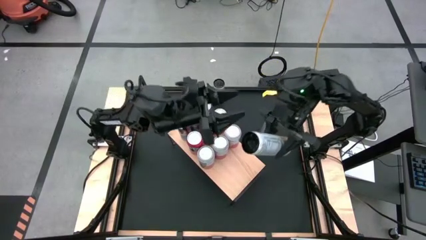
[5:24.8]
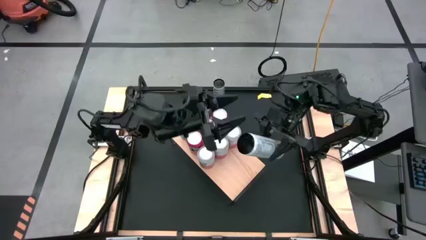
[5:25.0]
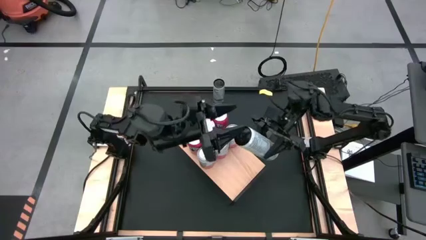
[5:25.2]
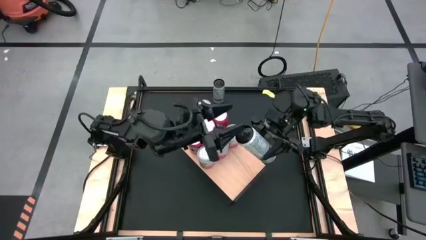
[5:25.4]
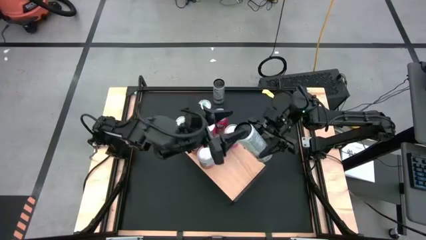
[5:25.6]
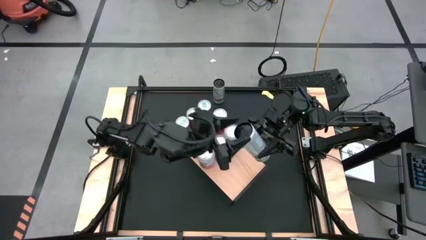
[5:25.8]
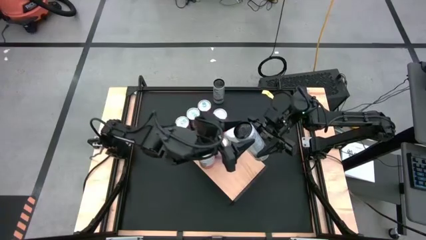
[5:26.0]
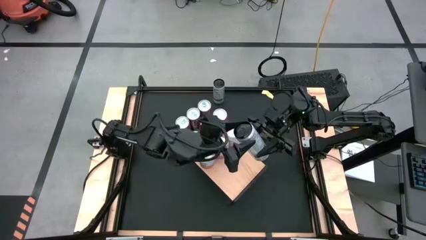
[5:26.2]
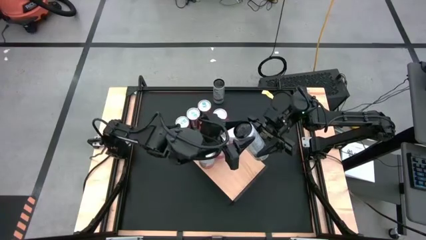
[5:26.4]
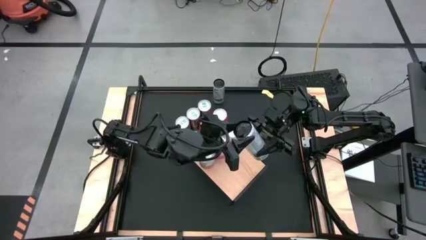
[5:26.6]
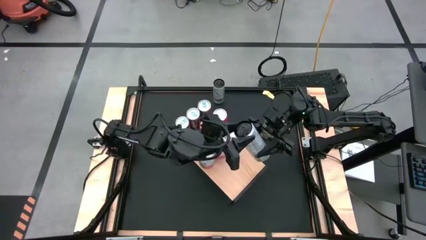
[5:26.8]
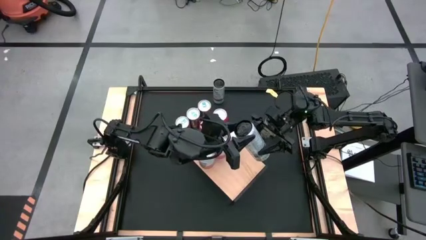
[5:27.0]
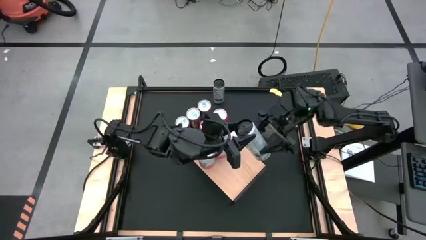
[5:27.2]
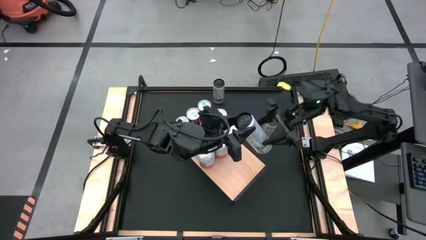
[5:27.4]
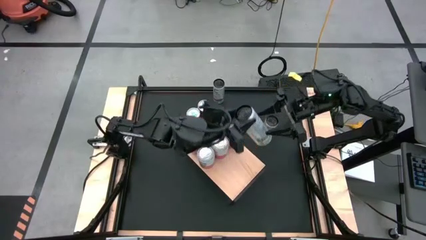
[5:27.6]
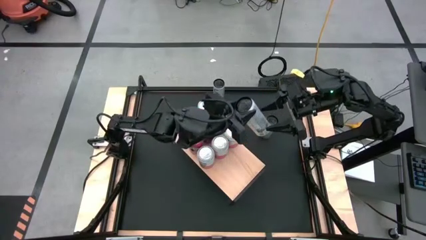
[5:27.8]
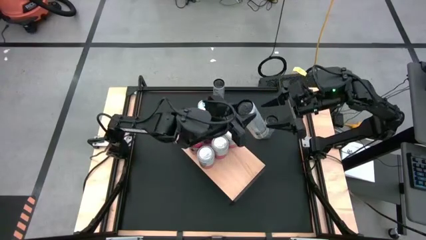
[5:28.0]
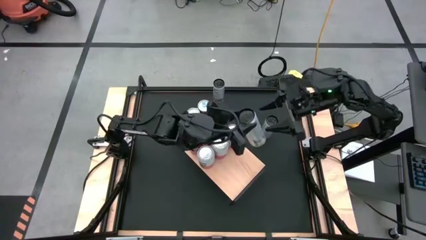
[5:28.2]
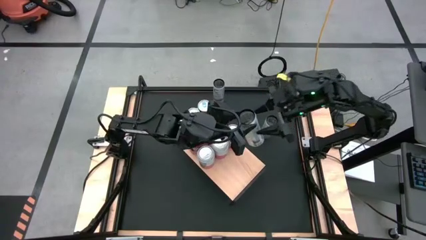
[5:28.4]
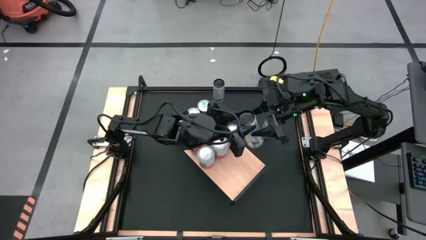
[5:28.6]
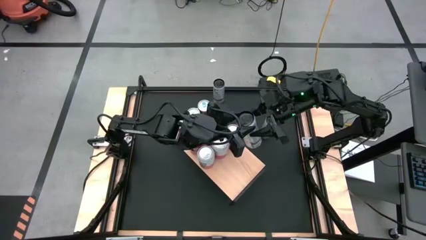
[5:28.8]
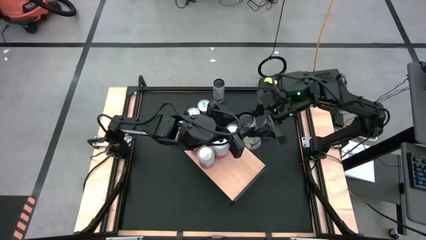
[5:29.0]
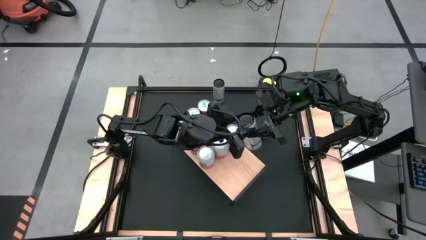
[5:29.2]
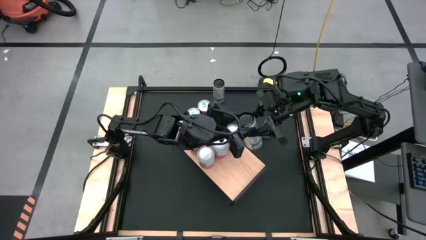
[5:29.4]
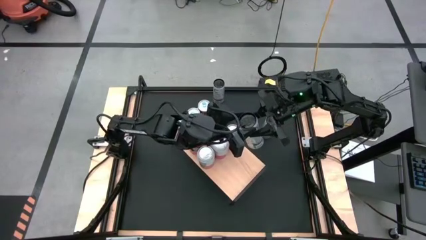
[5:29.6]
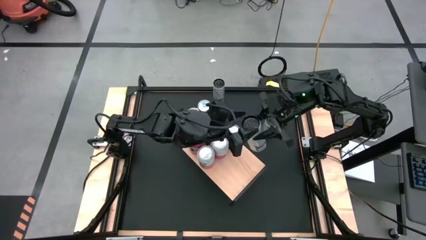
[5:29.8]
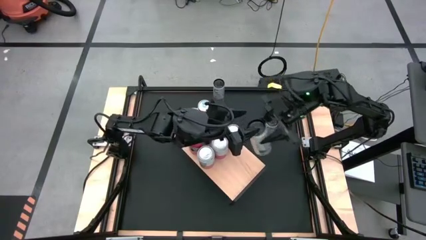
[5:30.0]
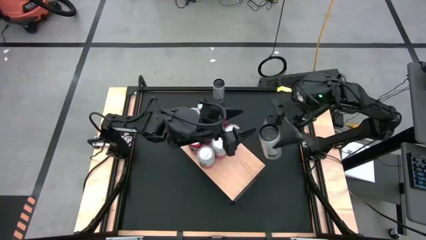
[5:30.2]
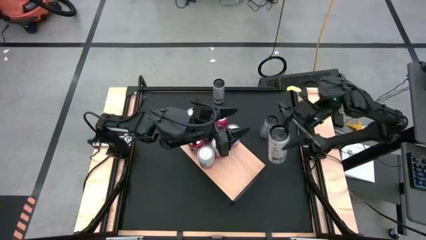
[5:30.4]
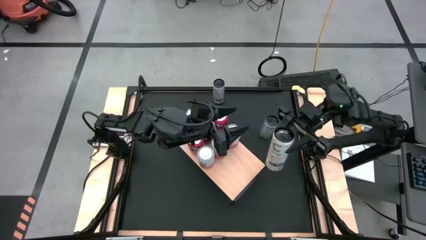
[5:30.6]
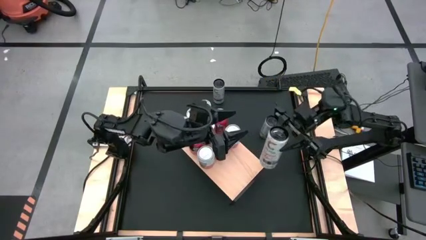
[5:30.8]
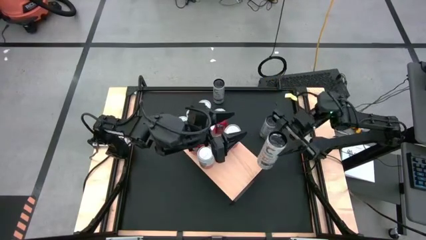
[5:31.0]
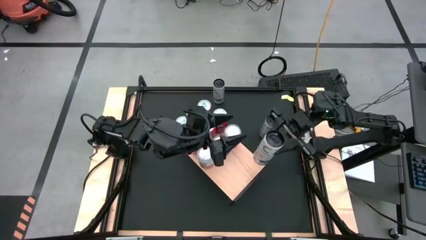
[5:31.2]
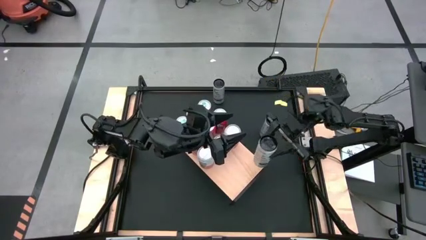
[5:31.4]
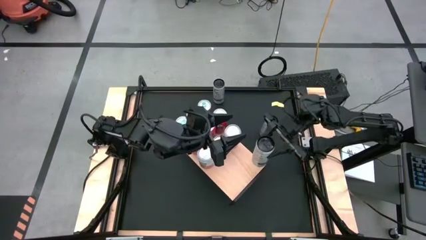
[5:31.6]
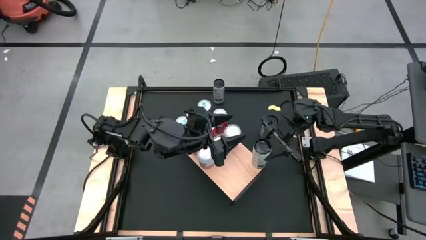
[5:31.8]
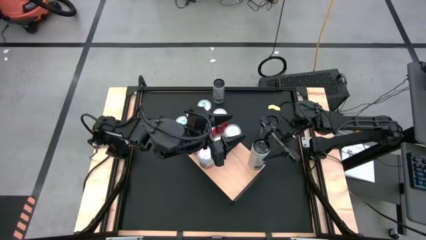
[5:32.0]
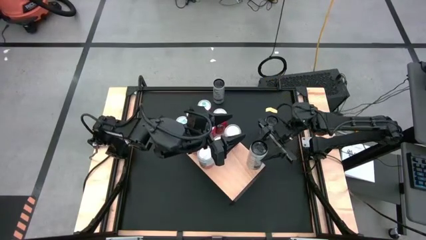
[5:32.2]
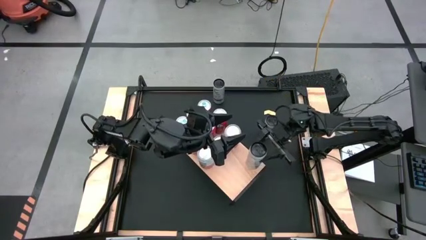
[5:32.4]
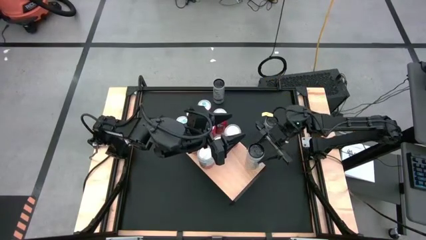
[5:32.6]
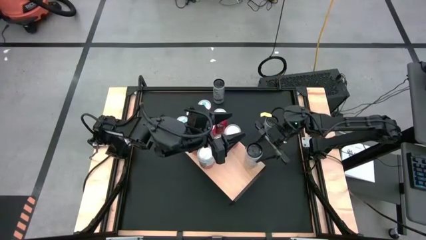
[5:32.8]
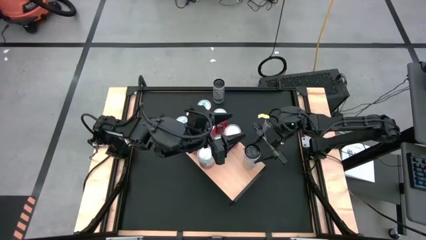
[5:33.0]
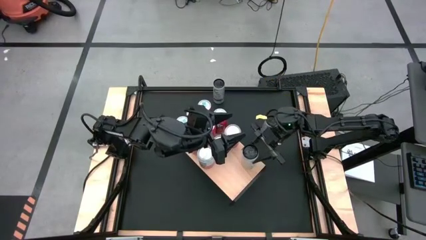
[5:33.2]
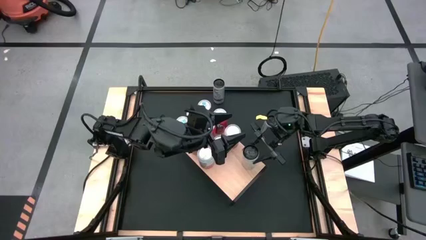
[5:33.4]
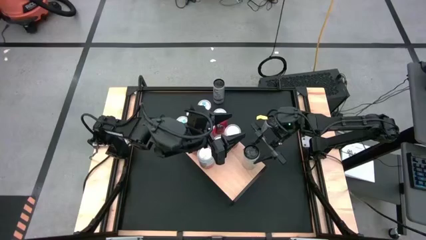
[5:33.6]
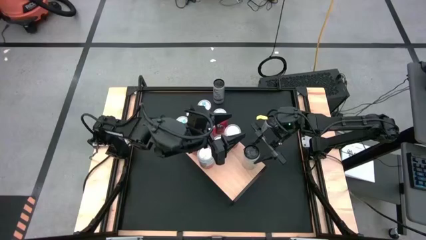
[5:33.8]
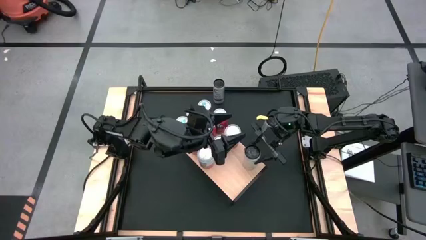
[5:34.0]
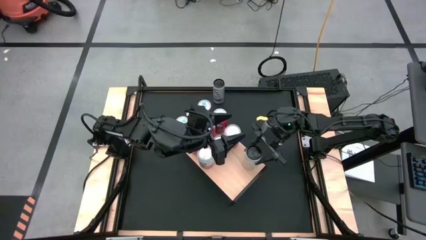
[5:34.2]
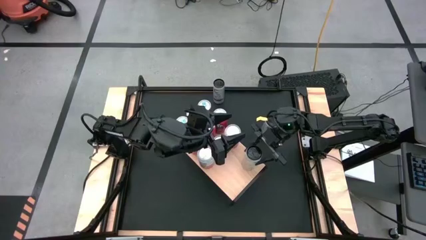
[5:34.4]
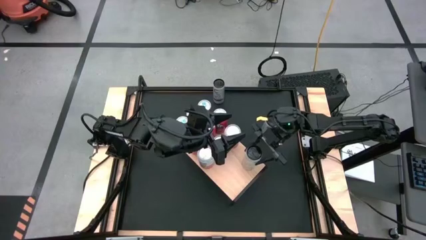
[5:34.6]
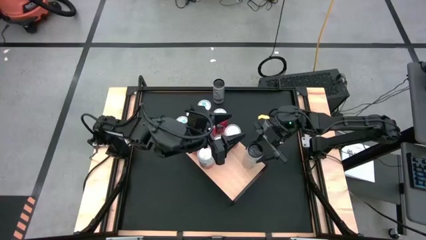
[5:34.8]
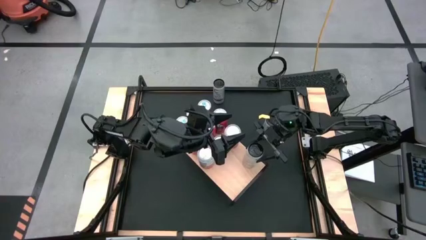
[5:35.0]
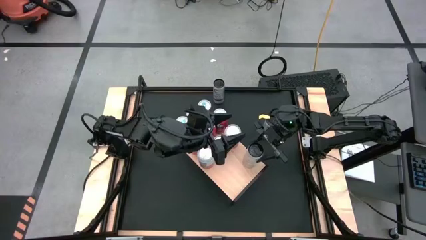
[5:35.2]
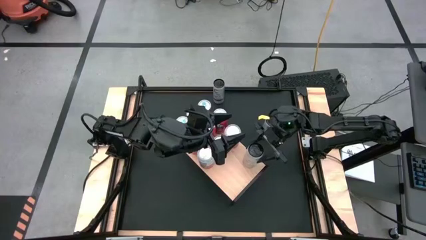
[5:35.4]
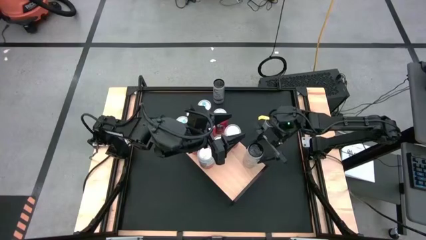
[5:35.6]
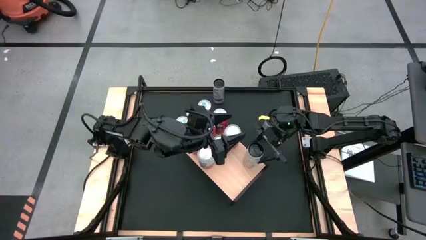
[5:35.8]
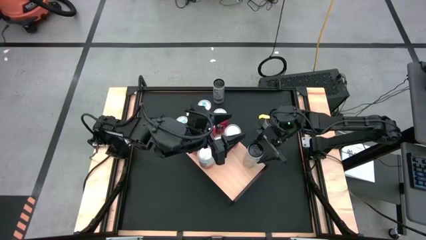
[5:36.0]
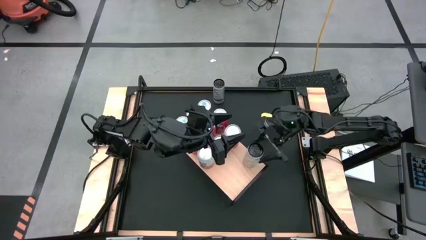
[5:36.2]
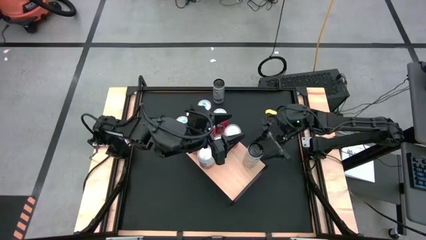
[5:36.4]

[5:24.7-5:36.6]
Task: Place canned beverage on shelf
Put the left white soda can on the shelf

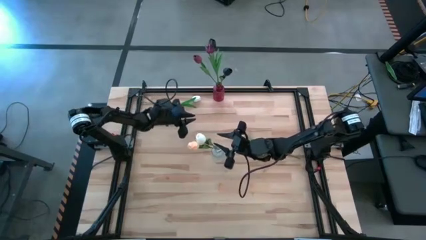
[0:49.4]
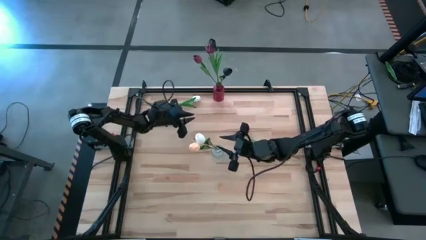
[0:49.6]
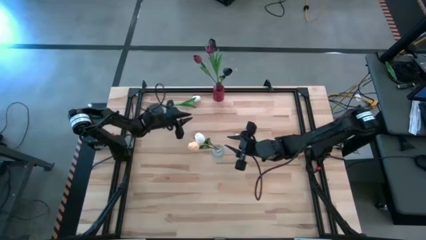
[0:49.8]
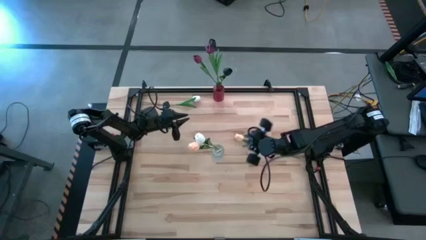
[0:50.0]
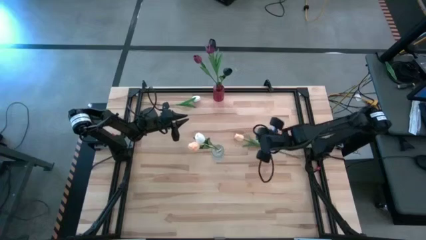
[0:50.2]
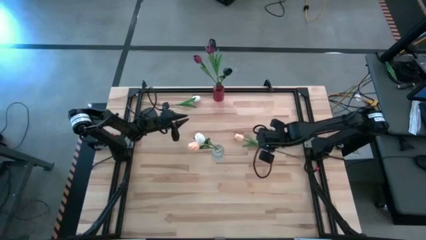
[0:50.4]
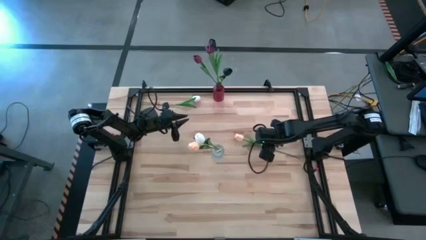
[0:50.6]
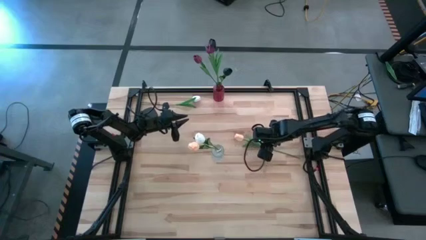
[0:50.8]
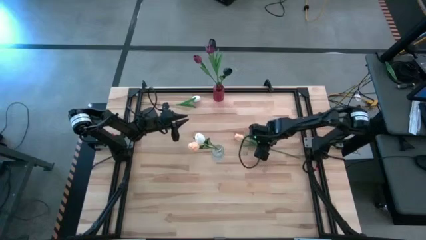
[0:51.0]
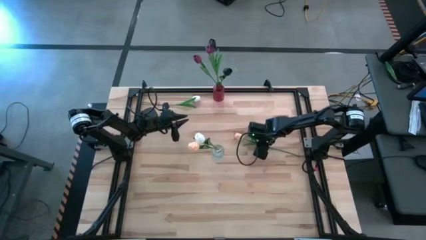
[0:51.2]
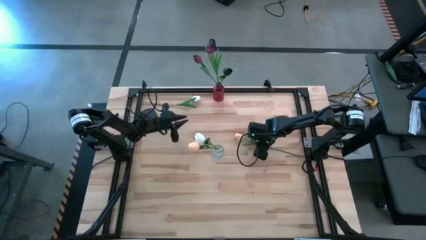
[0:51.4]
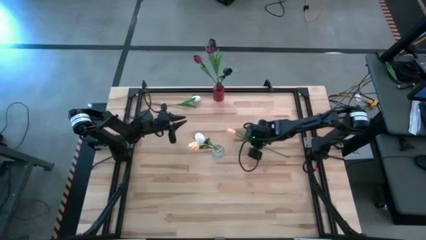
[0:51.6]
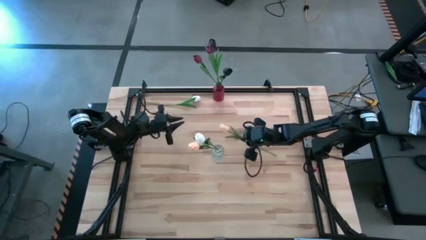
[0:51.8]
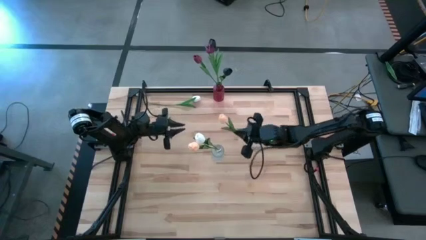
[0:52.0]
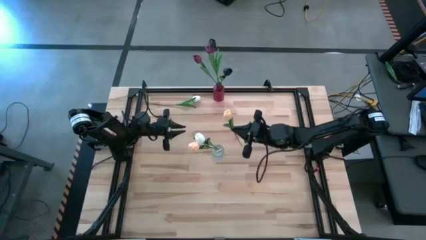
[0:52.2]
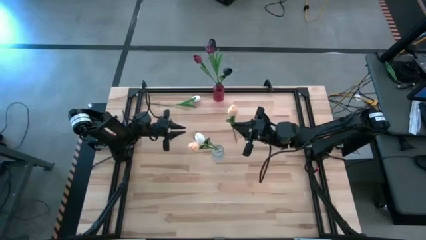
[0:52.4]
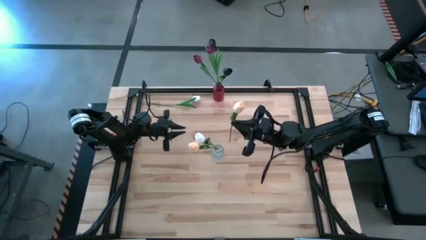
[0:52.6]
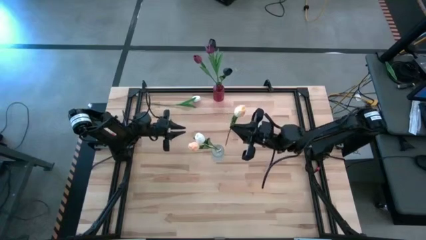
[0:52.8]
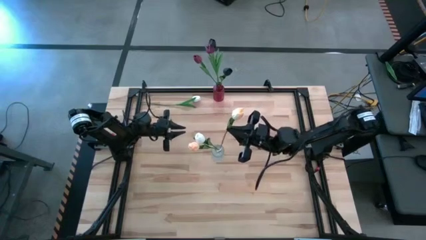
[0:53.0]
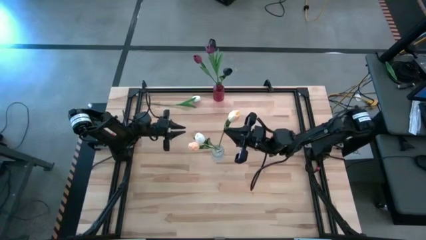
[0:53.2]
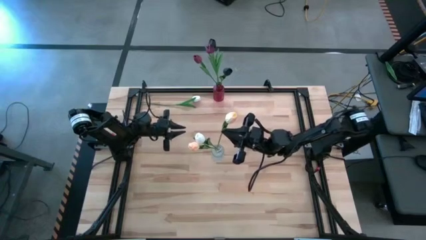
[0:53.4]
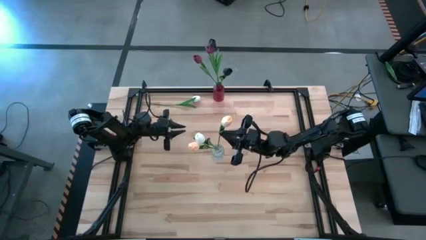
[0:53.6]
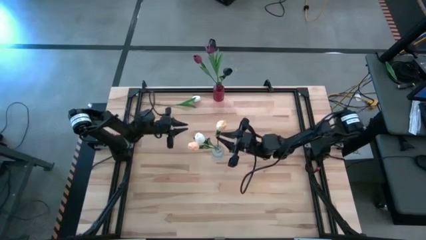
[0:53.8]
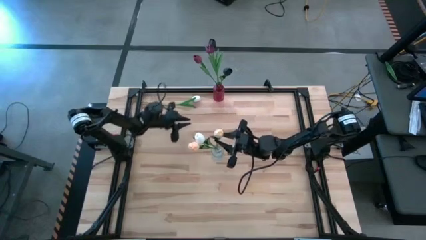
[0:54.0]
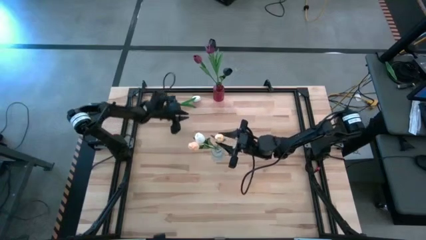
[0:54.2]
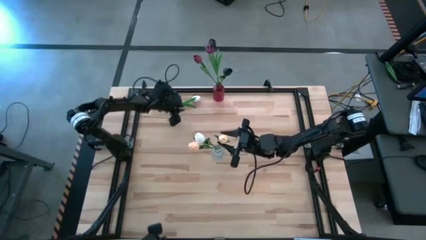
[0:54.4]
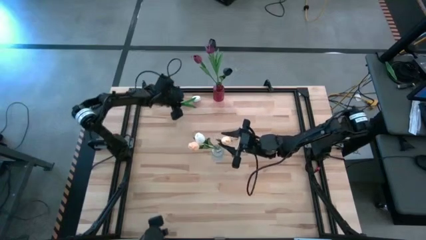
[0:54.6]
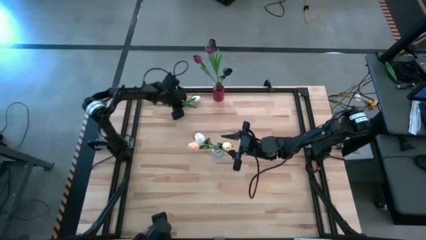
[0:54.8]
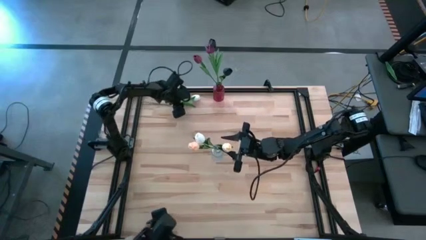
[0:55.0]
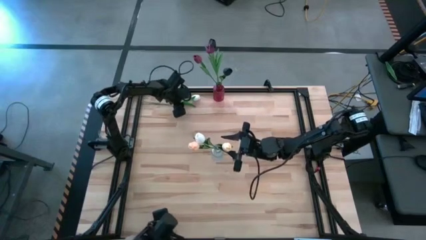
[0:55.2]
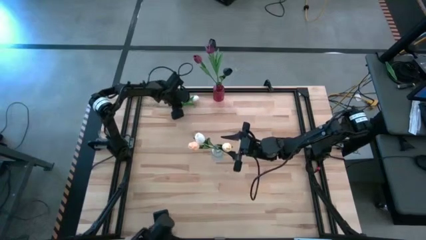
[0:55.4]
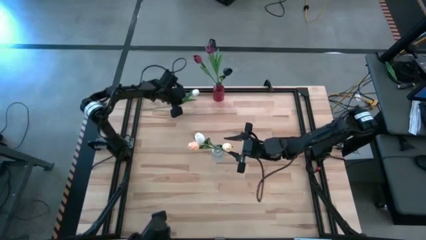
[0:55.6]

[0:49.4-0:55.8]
Task: Sort flowers into vase by color
Put the orange tulip into the transparent vase
